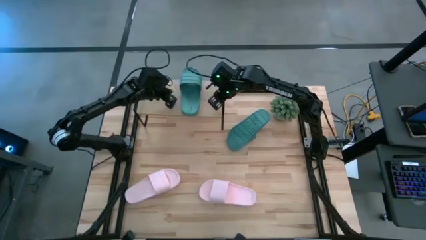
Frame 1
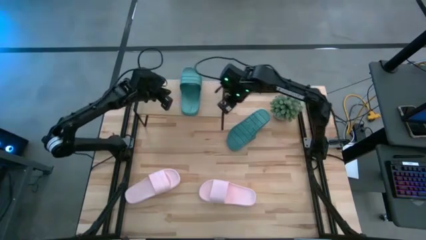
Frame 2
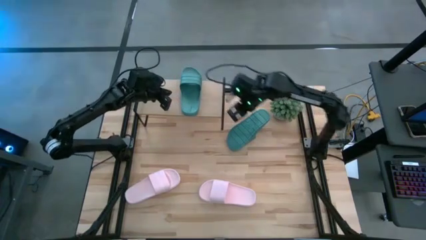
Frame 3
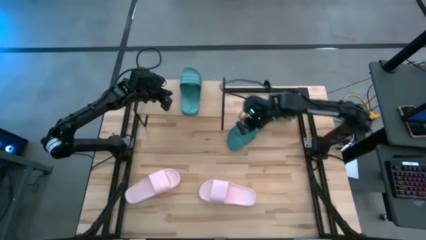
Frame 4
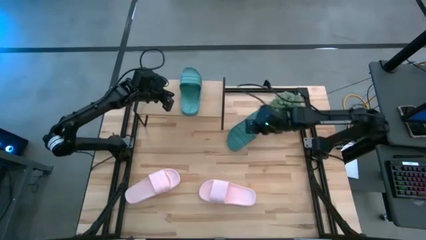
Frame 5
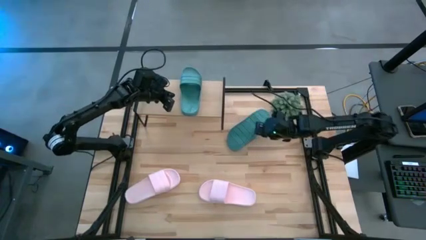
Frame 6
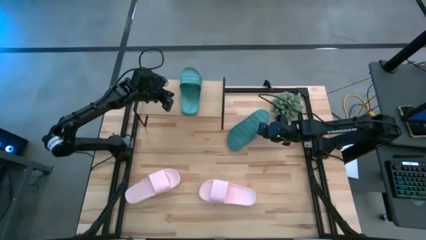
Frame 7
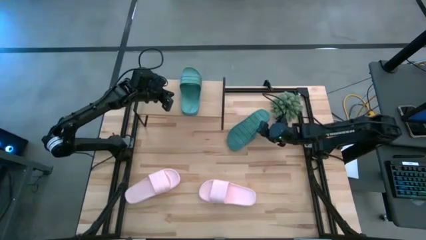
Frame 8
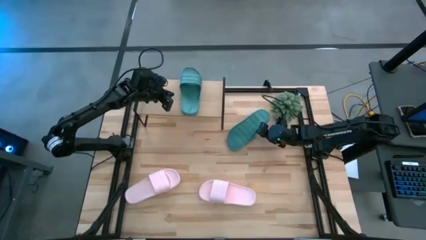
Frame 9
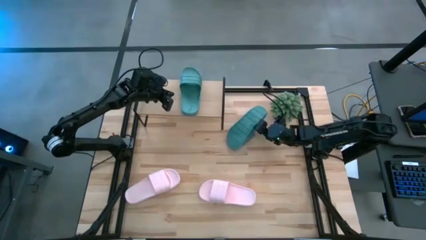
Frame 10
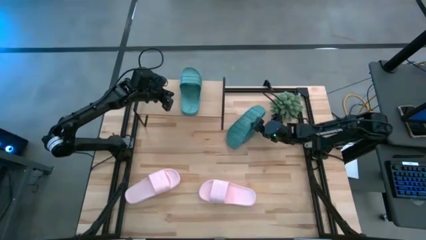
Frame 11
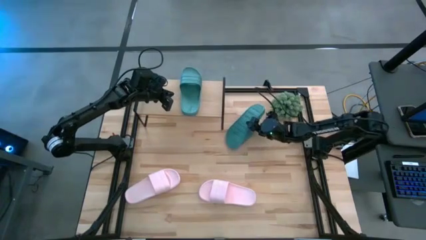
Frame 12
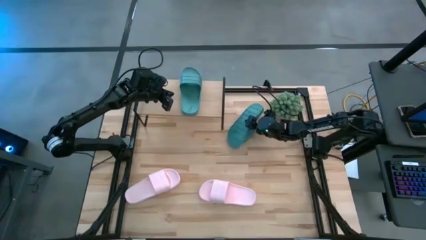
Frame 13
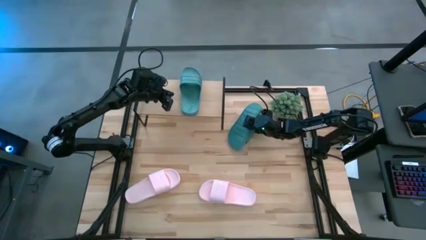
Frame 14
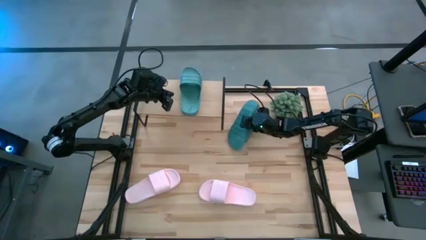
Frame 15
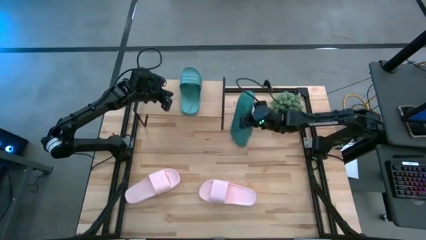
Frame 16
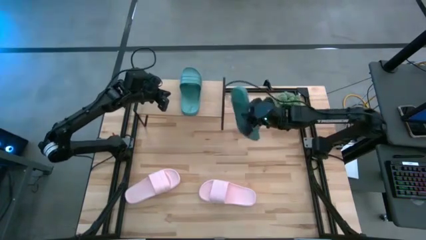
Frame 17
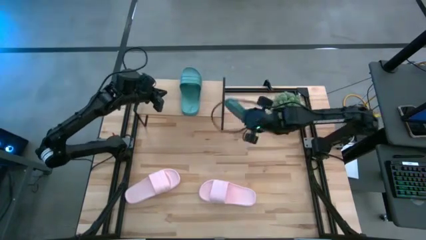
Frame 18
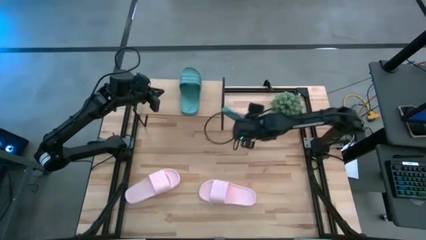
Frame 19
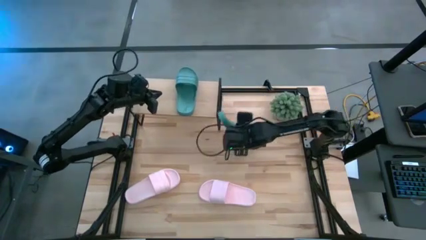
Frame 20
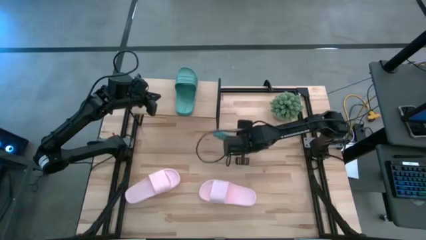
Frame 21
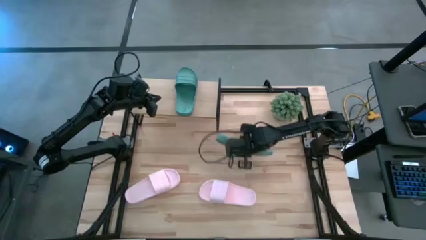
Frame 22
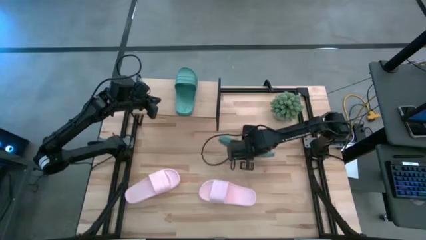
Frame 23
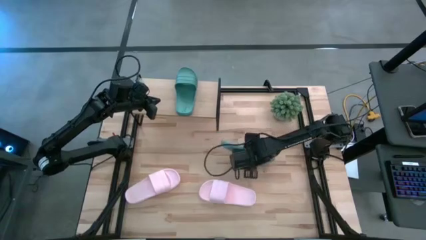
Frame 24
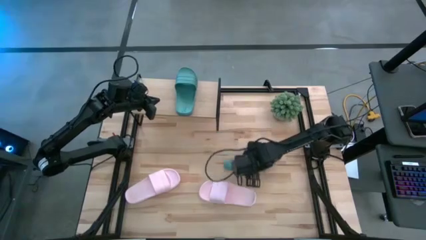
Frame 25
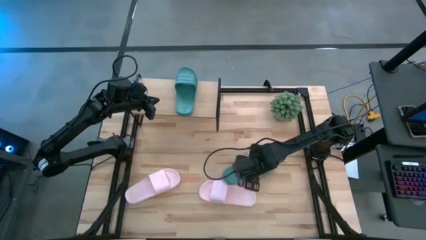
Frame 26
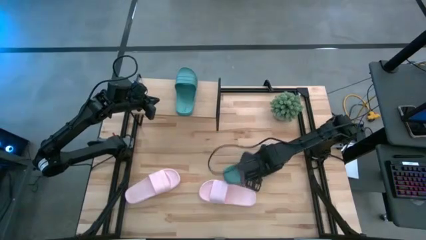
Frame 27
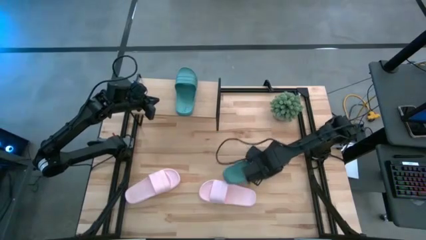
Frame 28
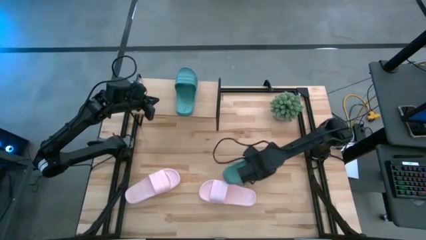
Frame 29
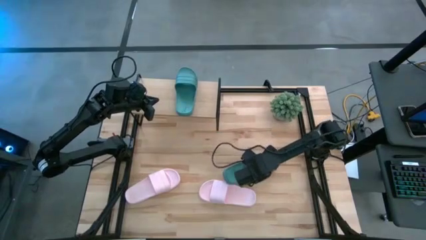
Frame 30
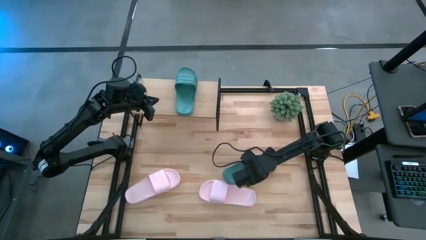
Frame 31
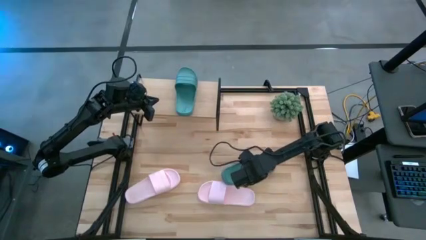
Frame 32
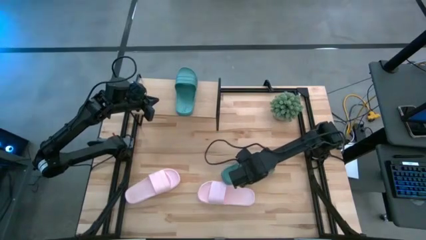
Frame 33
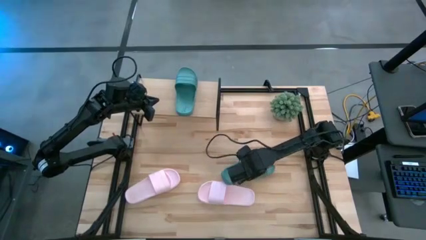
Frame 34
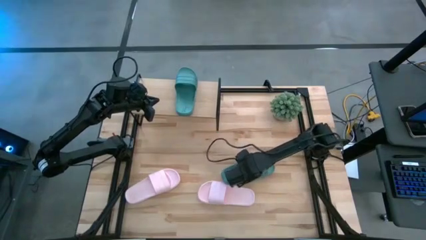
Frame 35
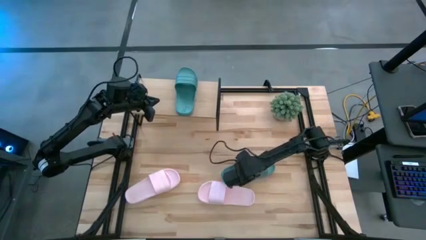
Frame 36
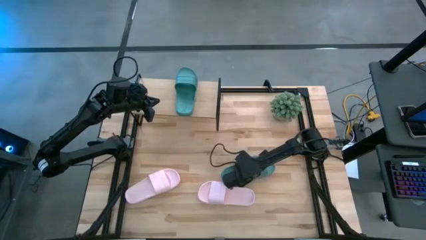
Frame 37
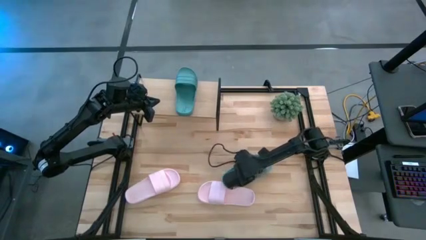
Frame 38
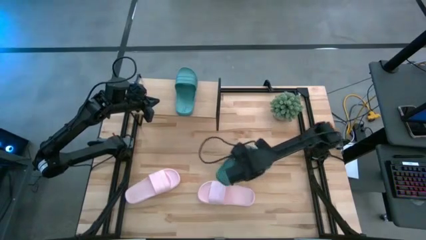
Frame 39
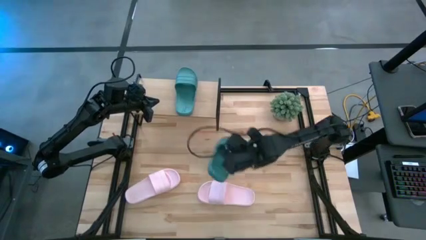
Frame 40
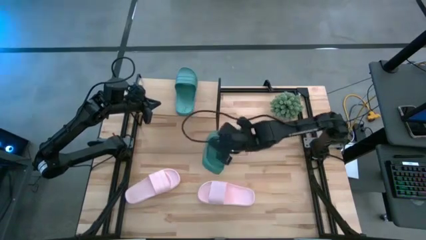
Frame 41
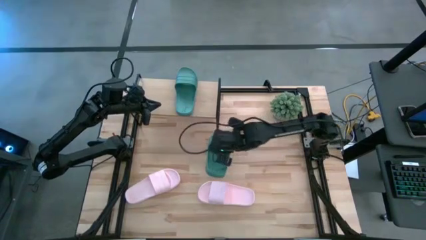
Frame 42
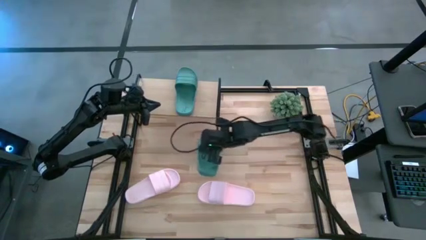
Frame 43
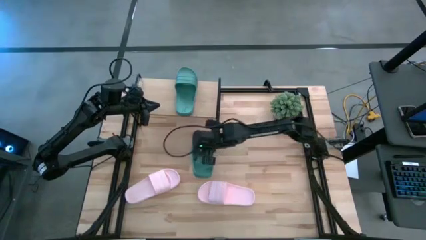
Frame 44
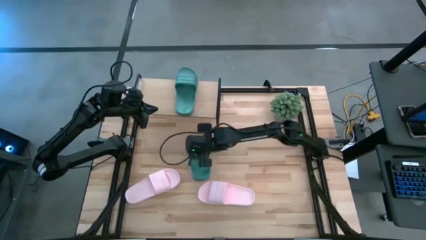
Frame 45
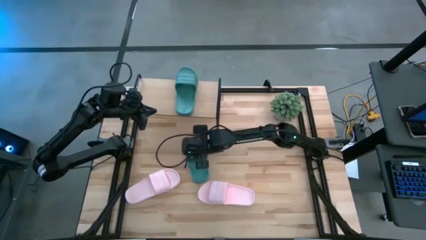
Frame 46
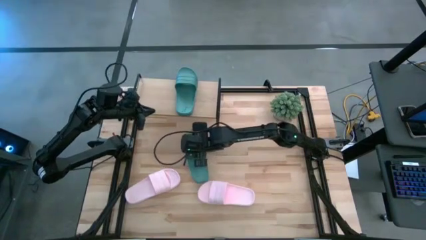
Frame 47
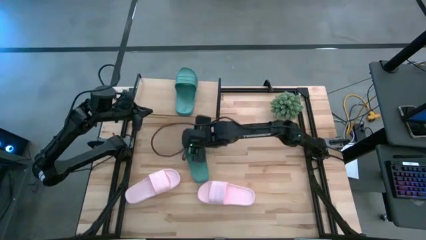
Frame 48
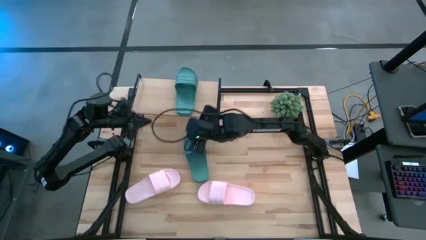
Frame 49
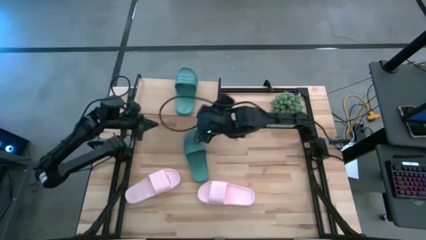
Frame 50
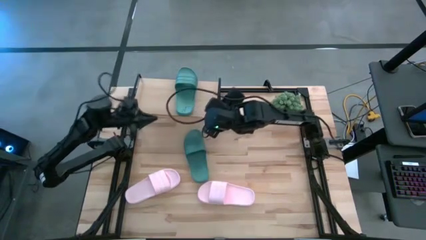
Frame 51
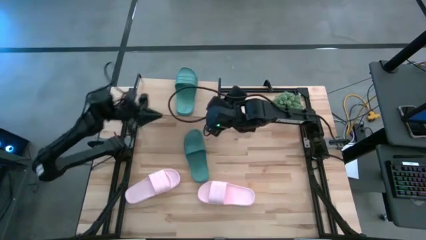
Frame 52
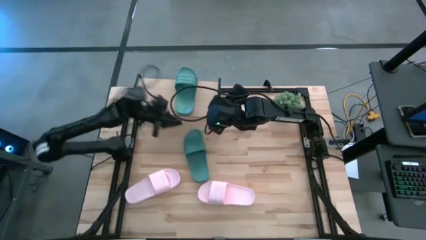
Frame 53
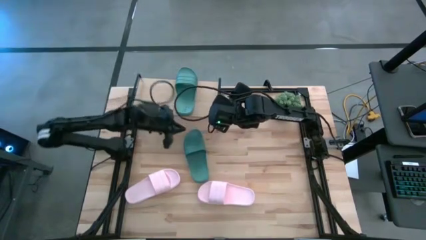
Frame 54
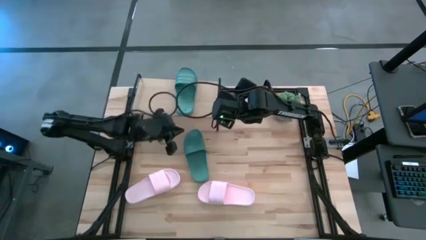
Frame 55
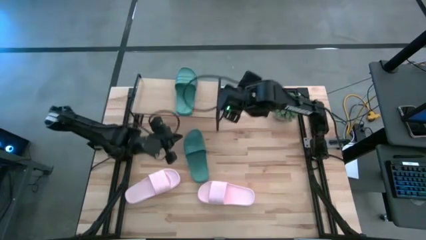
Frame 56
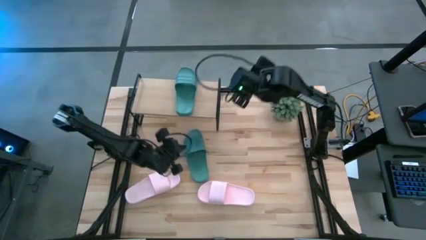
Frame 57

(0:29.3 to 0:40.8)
Task: Pick and place slides into the shelf
Put the blue slide on the shelf
